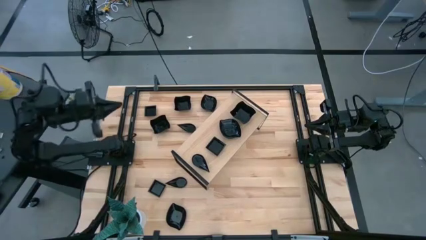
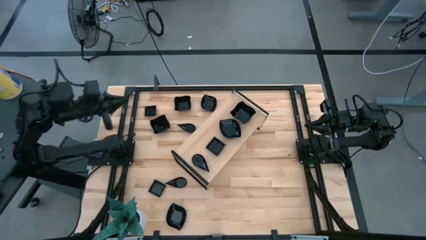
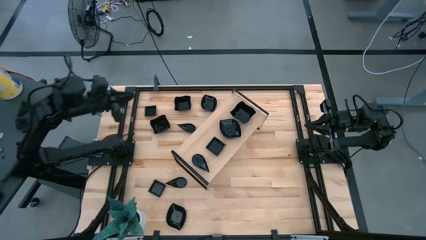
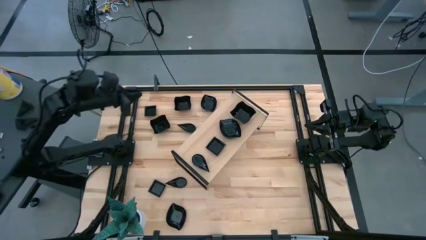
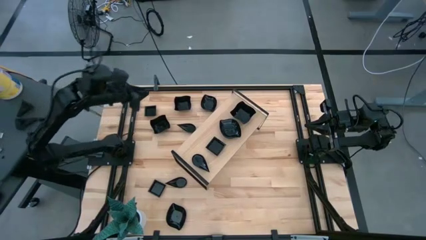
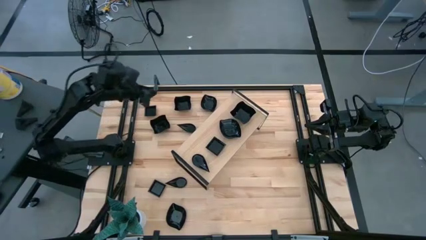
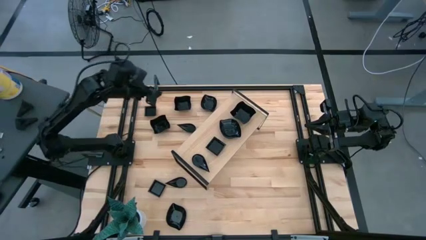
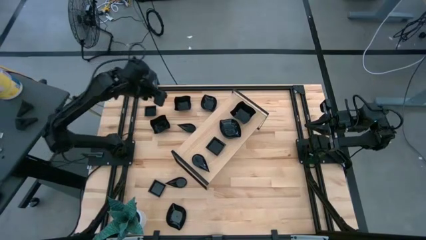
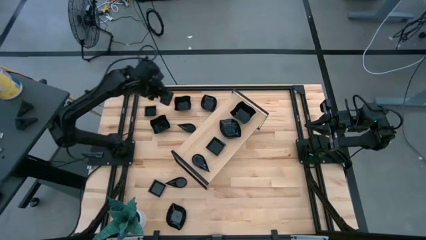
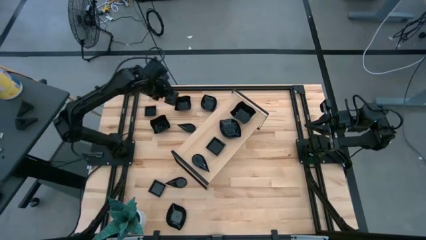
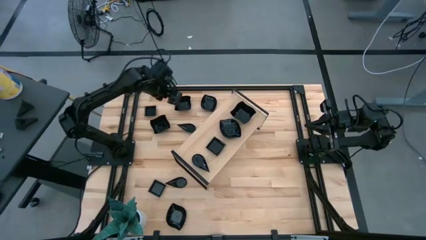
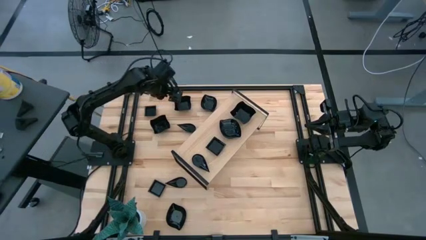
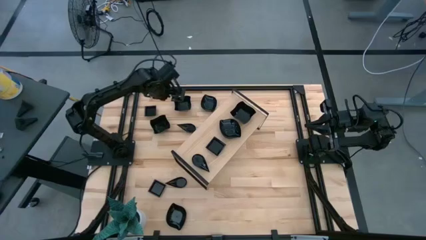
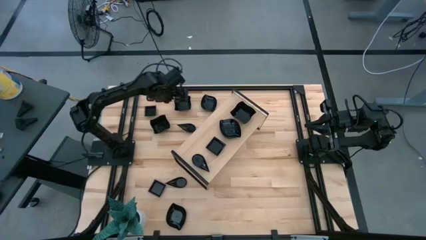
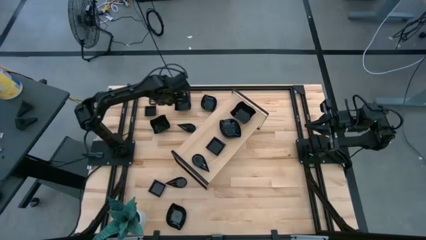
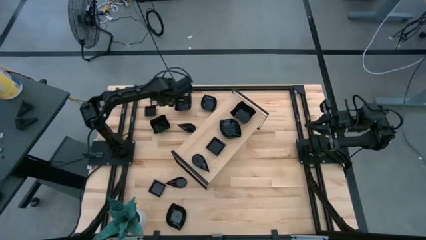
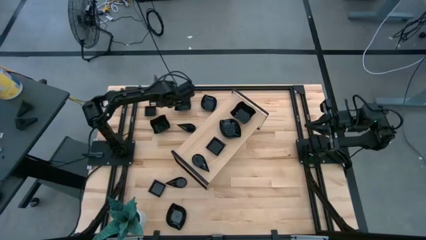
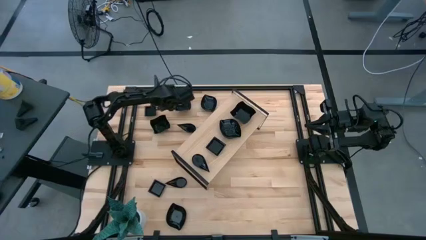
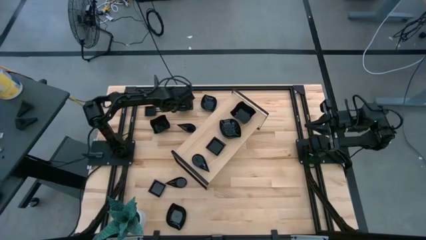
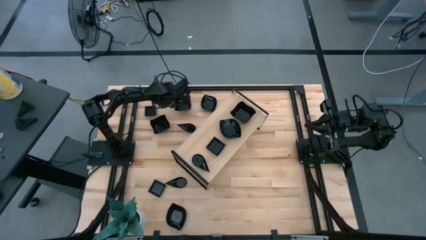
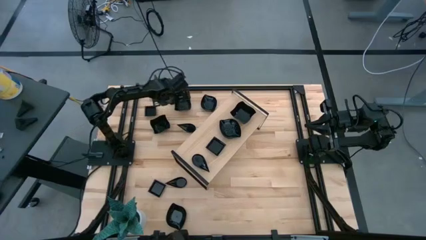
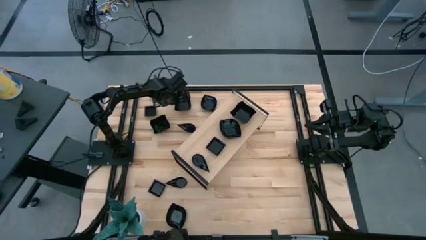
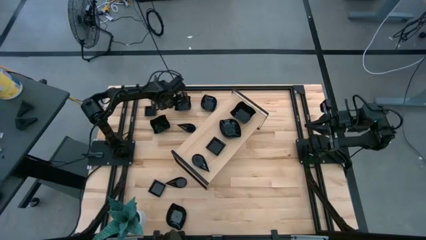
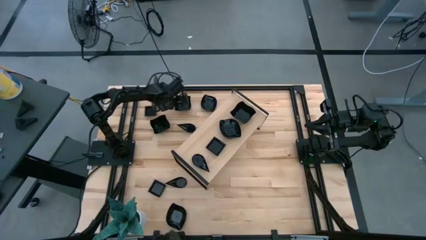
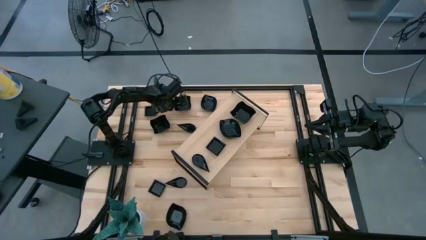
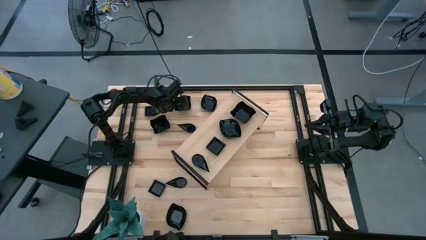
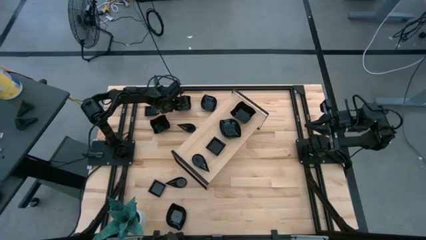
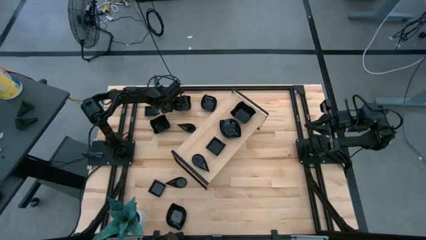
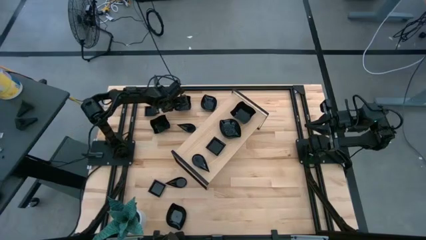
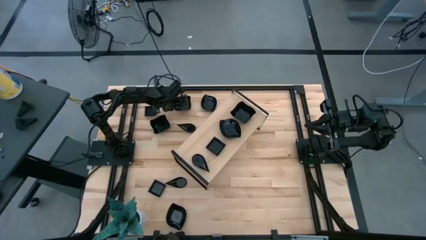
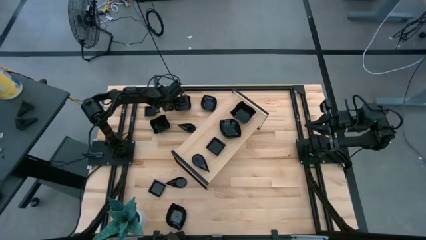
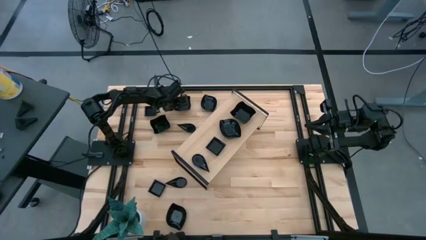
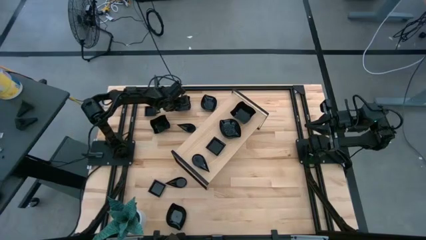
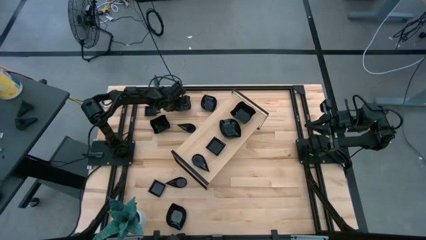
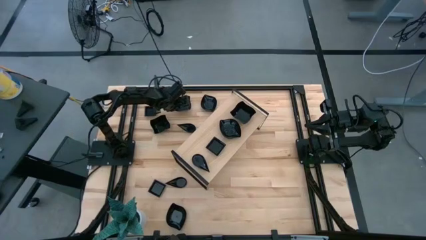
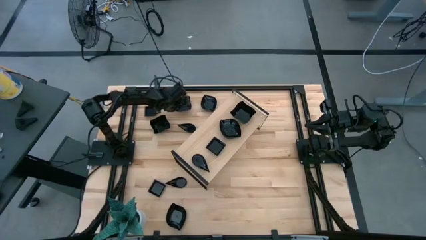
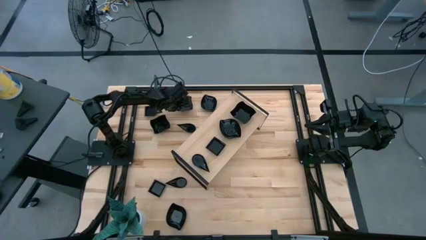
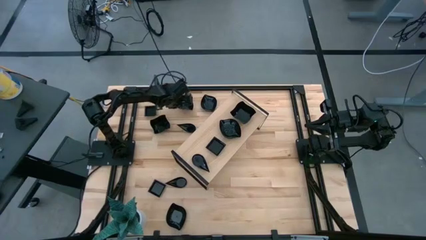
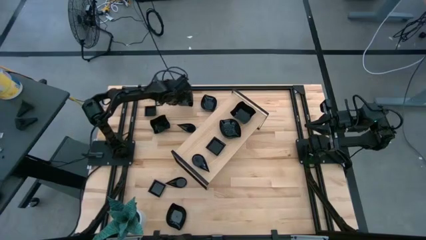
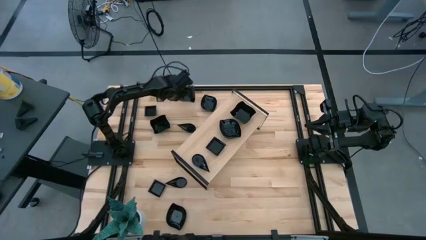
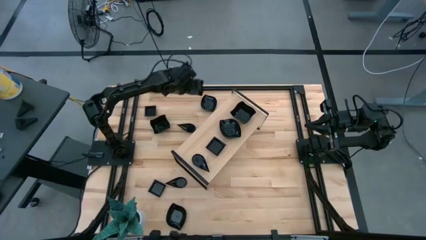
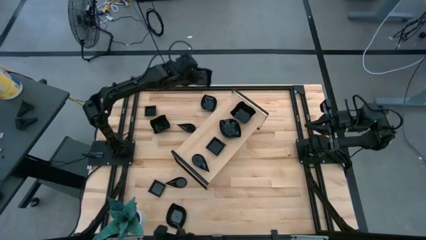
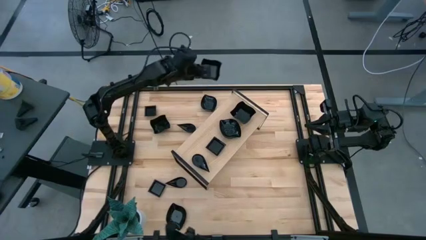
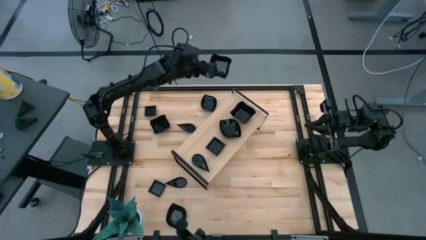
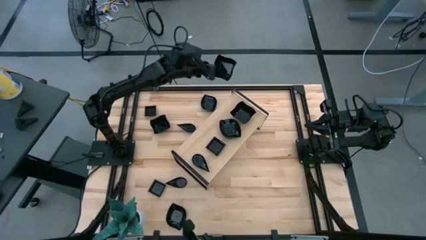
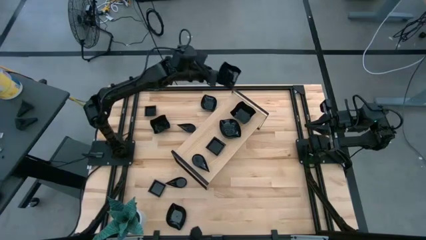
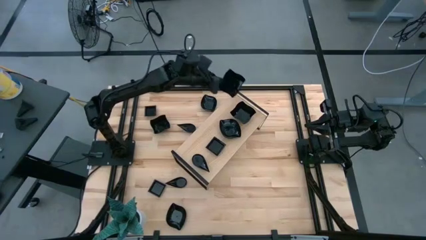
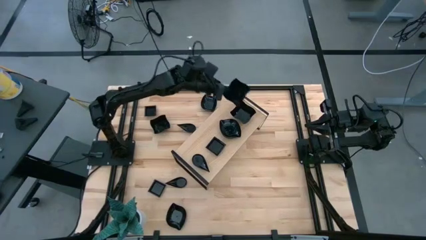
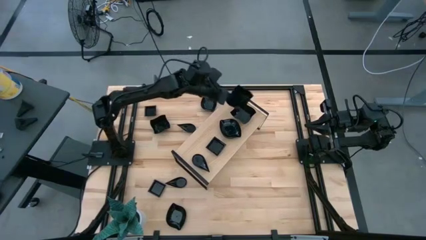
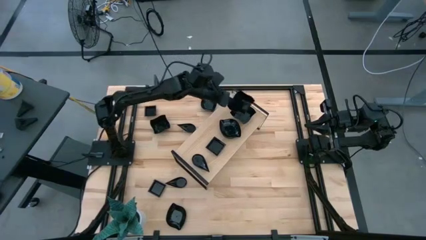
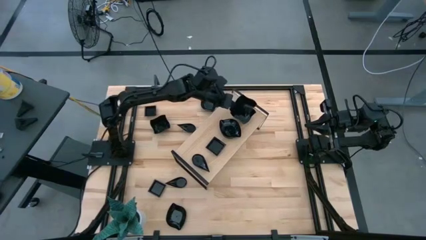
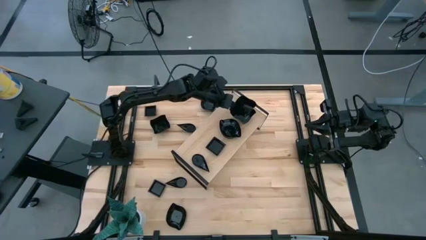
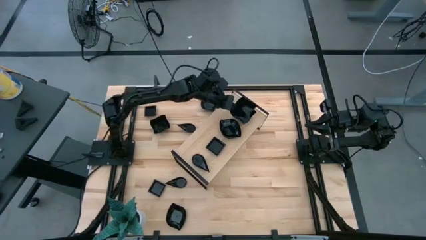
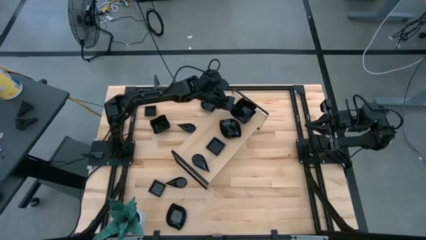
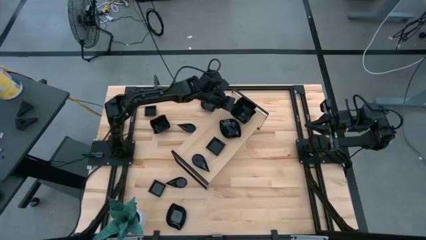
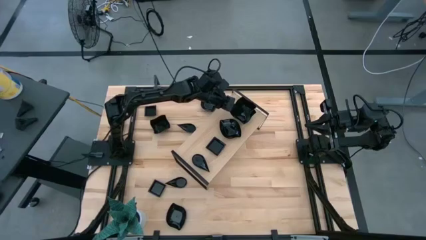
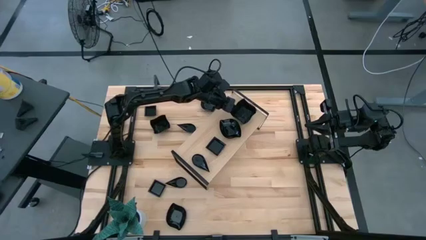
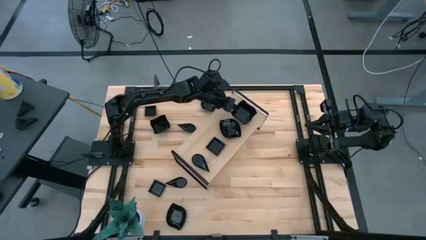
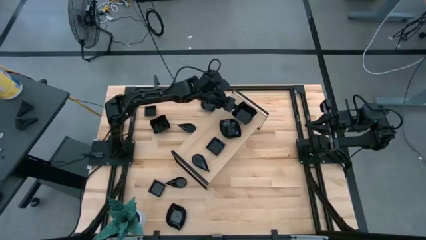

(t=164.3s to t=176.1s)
Task: Pick & Place Mini shaped plates
Stack the black wave square shaped bowl on top of the black wave square shaped bowl on the shelf
